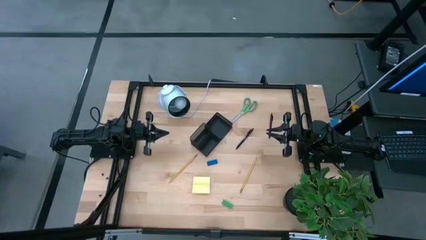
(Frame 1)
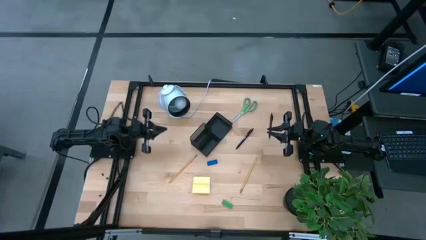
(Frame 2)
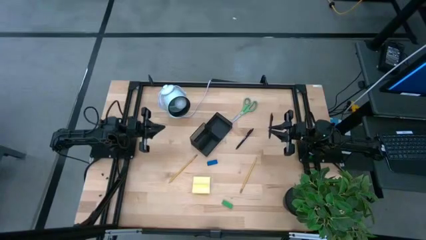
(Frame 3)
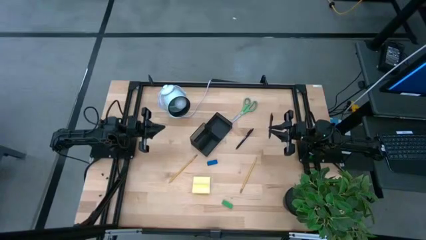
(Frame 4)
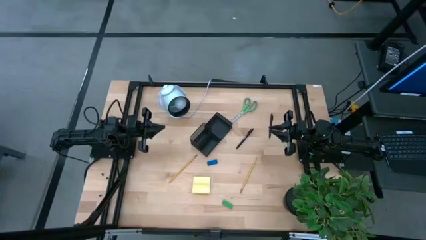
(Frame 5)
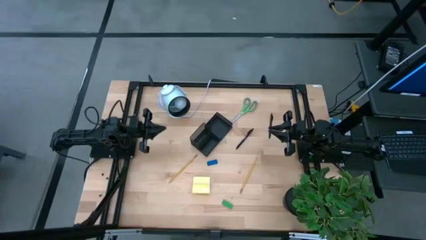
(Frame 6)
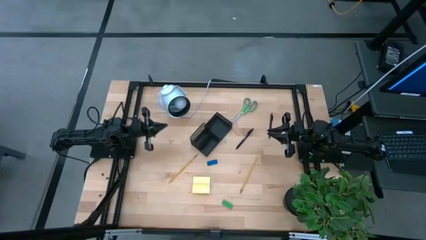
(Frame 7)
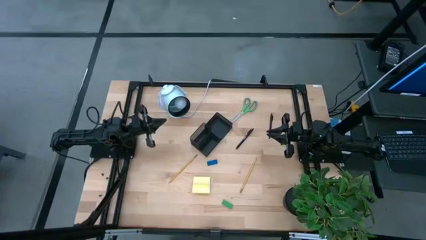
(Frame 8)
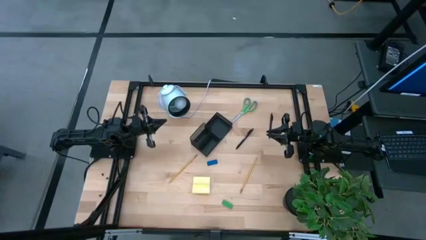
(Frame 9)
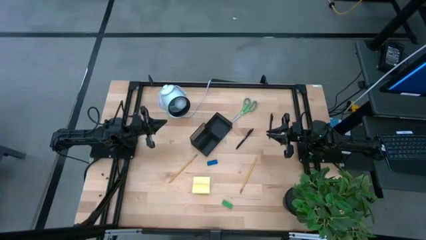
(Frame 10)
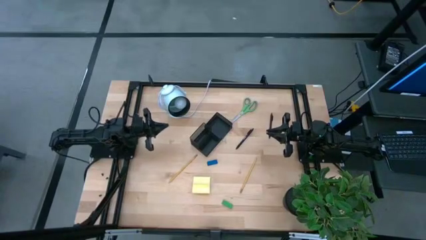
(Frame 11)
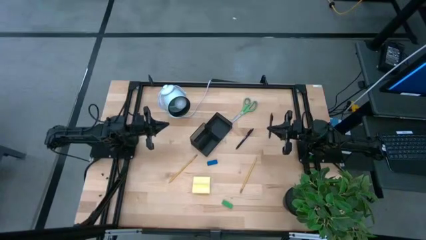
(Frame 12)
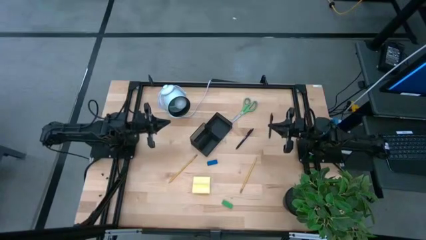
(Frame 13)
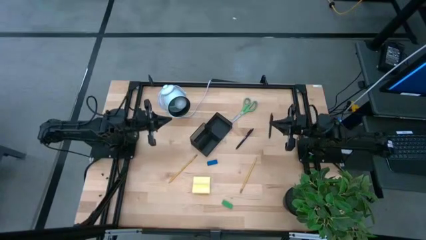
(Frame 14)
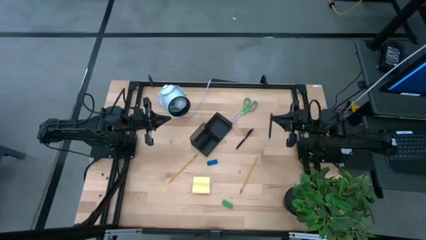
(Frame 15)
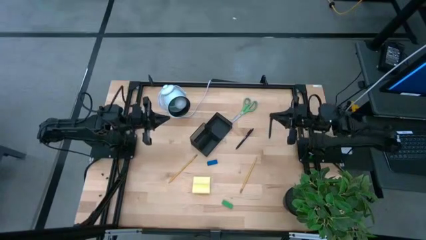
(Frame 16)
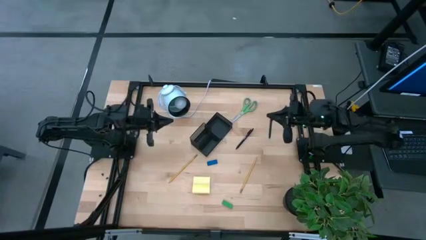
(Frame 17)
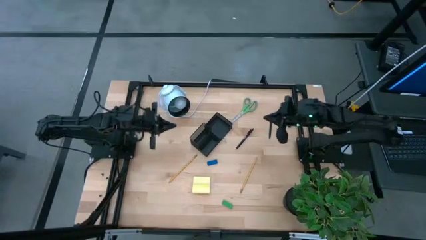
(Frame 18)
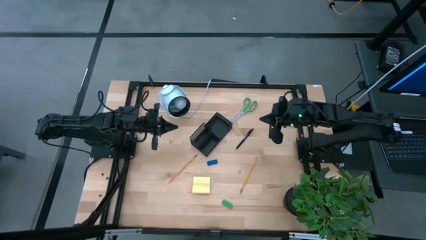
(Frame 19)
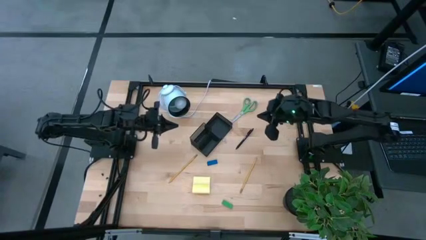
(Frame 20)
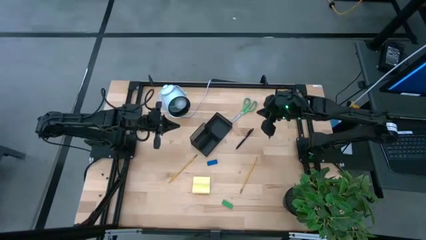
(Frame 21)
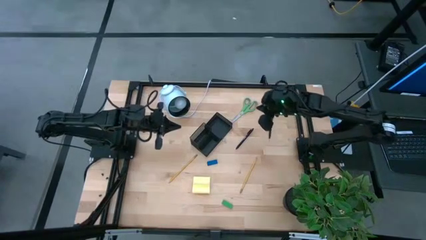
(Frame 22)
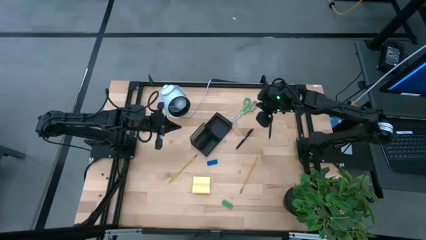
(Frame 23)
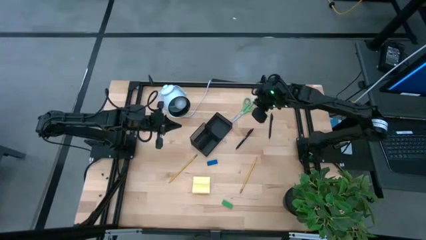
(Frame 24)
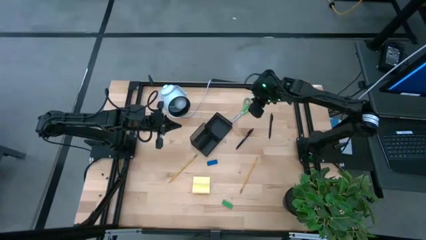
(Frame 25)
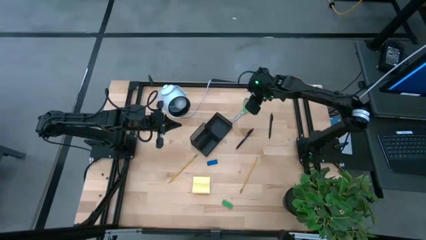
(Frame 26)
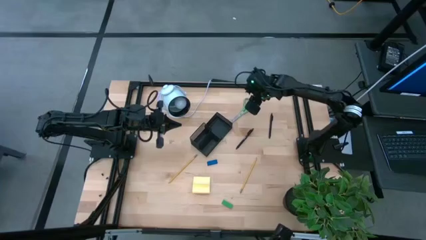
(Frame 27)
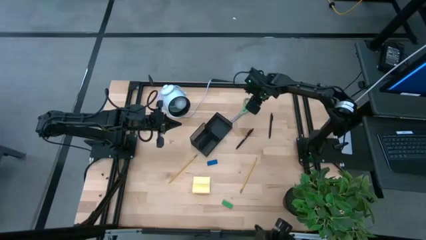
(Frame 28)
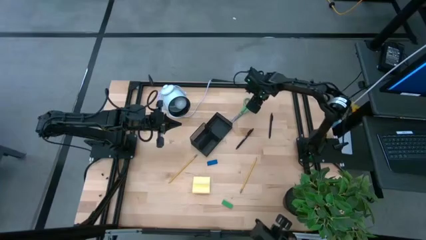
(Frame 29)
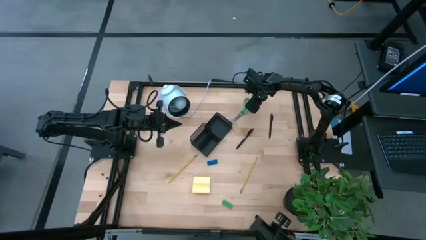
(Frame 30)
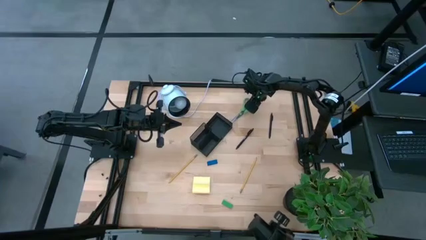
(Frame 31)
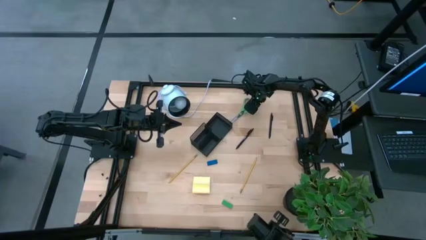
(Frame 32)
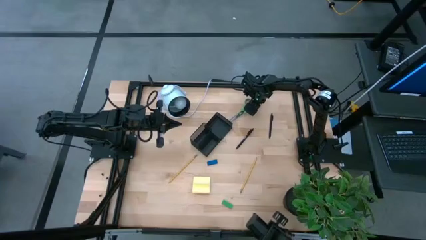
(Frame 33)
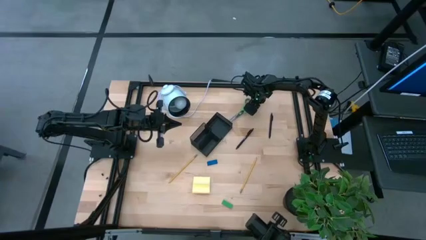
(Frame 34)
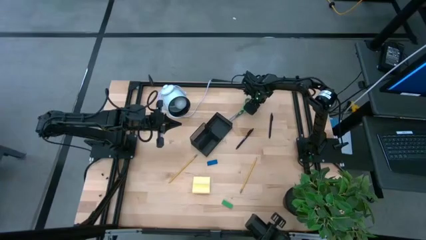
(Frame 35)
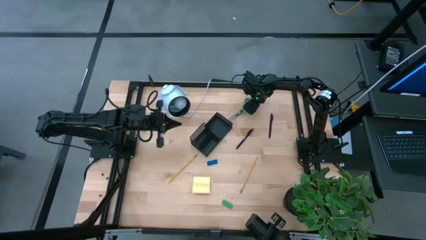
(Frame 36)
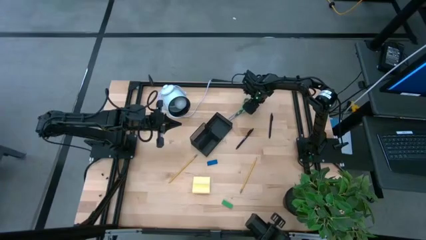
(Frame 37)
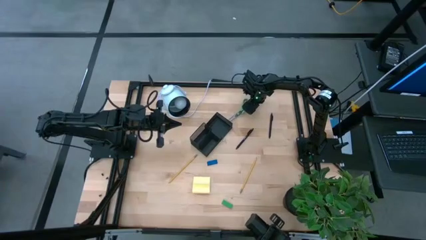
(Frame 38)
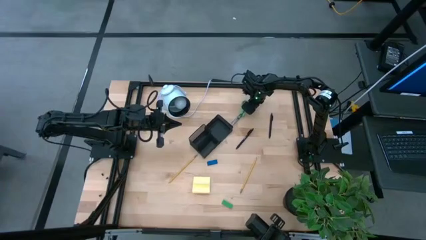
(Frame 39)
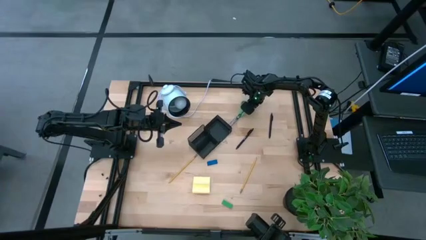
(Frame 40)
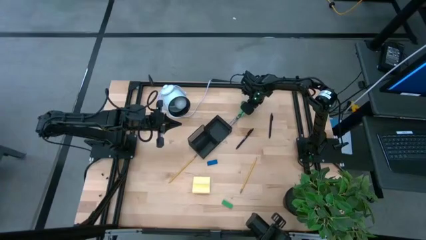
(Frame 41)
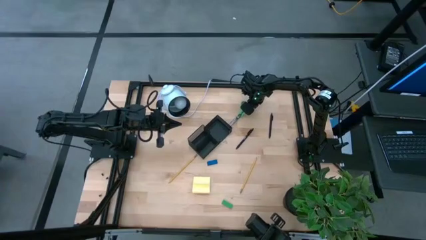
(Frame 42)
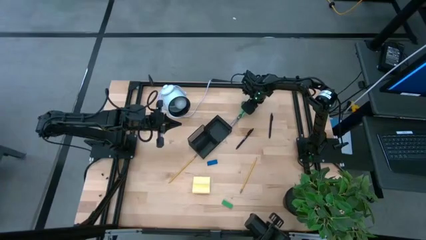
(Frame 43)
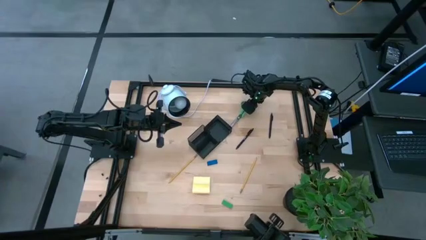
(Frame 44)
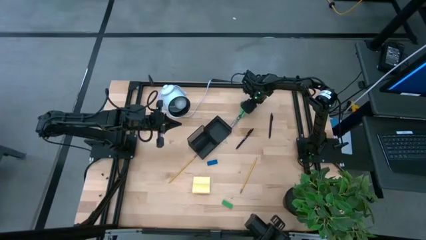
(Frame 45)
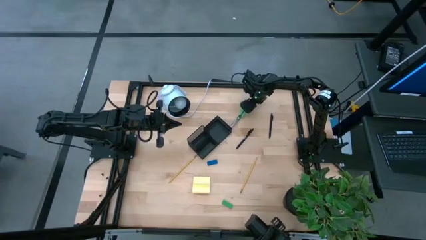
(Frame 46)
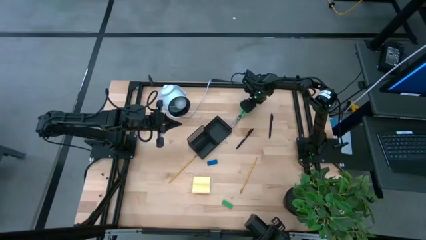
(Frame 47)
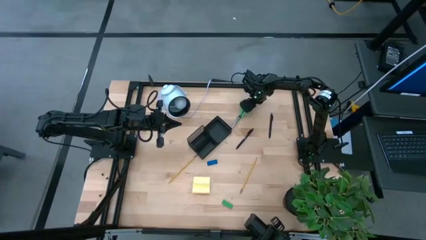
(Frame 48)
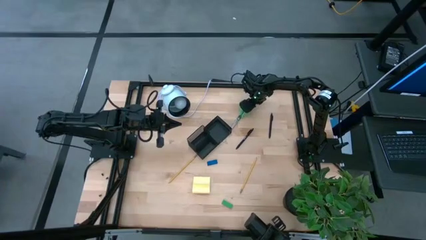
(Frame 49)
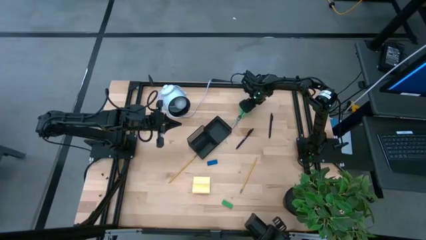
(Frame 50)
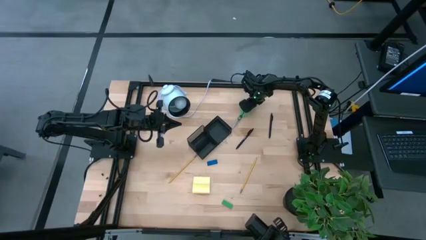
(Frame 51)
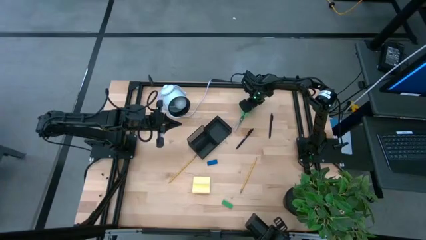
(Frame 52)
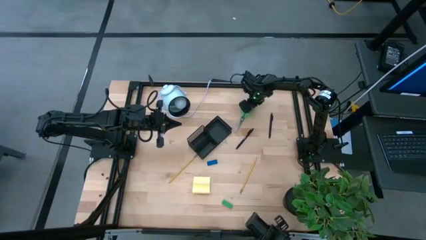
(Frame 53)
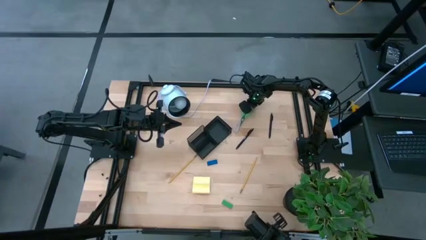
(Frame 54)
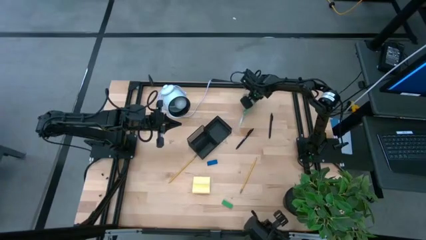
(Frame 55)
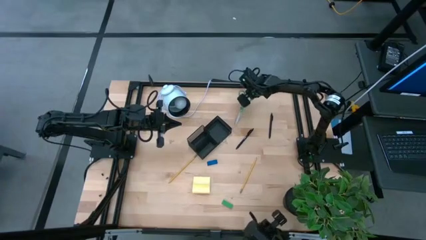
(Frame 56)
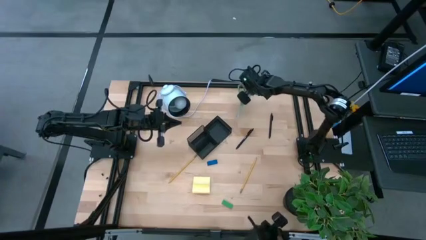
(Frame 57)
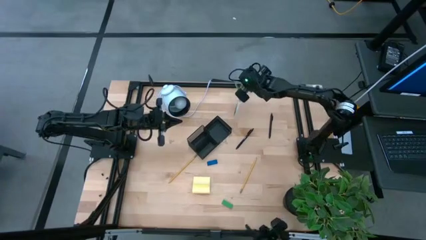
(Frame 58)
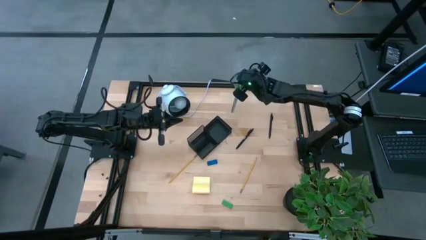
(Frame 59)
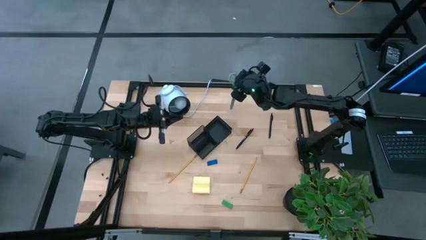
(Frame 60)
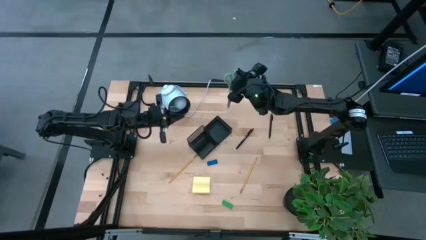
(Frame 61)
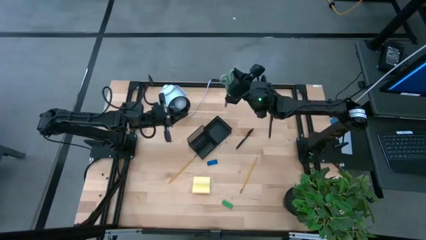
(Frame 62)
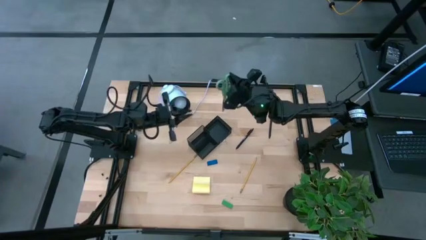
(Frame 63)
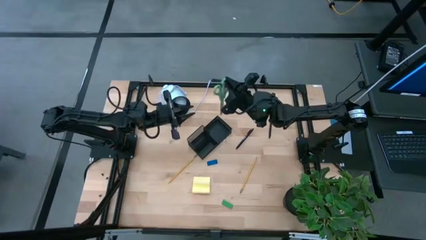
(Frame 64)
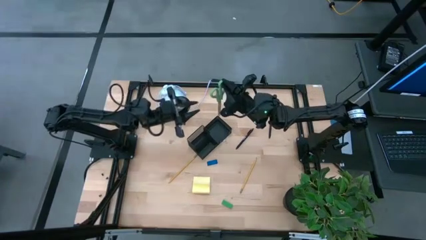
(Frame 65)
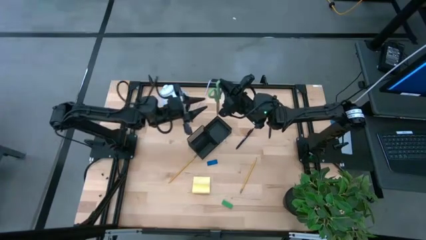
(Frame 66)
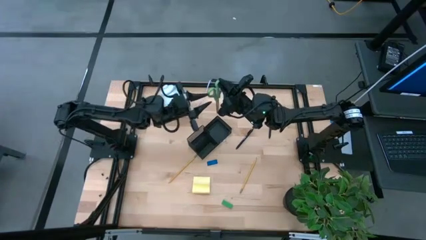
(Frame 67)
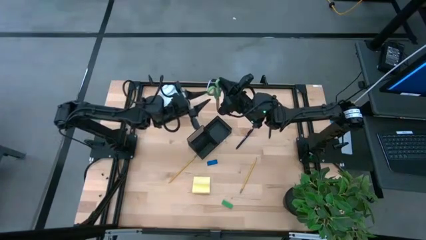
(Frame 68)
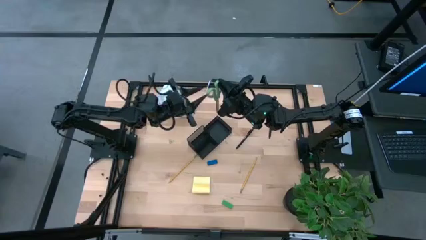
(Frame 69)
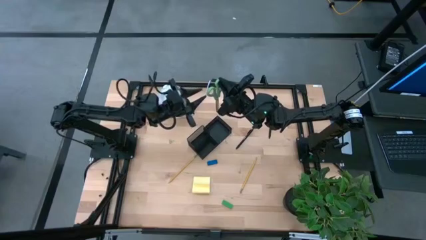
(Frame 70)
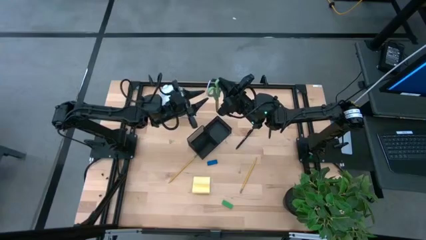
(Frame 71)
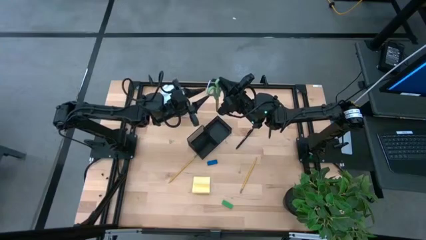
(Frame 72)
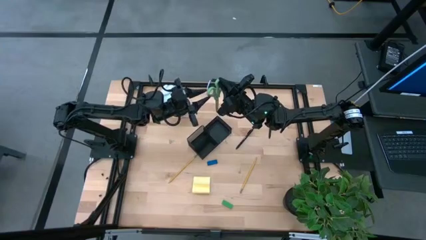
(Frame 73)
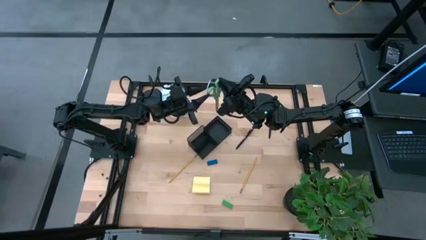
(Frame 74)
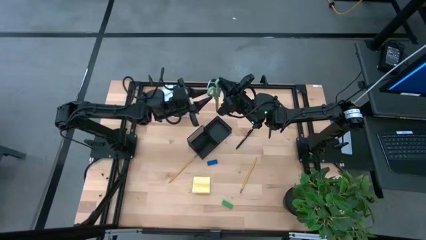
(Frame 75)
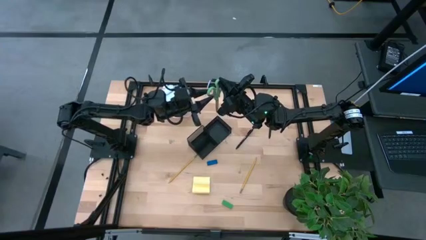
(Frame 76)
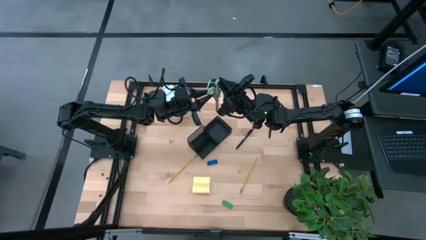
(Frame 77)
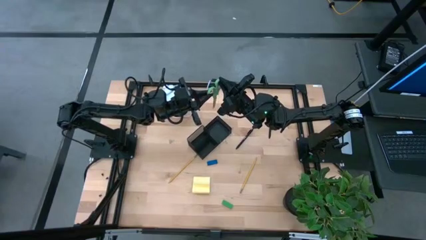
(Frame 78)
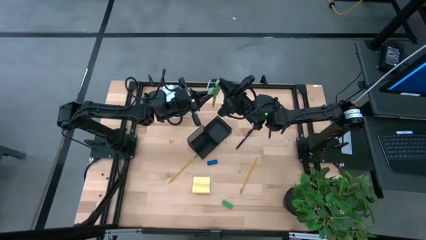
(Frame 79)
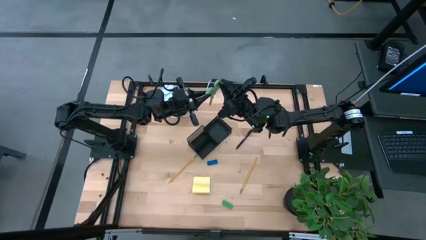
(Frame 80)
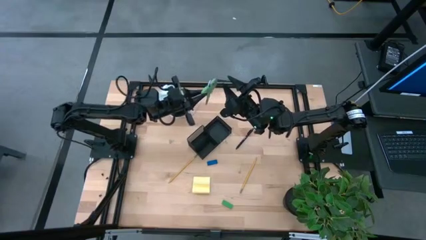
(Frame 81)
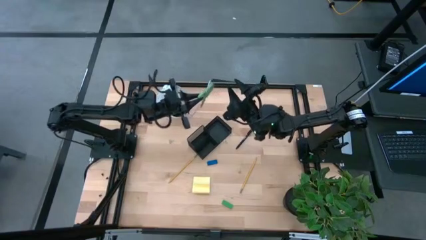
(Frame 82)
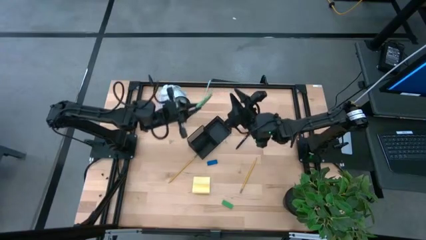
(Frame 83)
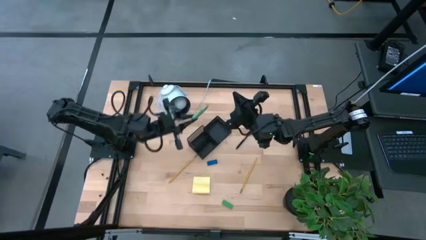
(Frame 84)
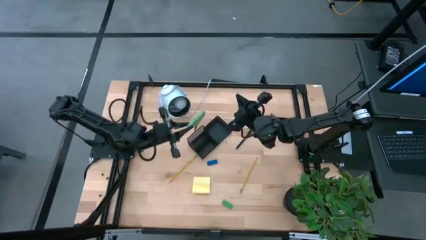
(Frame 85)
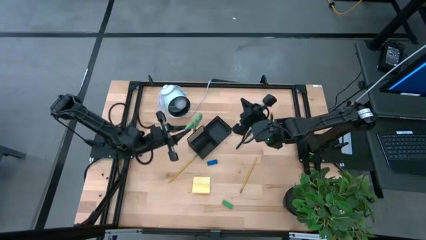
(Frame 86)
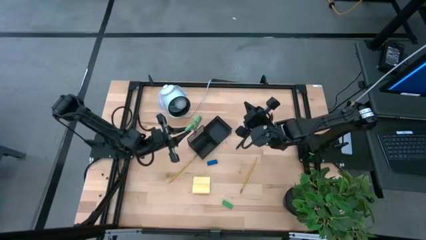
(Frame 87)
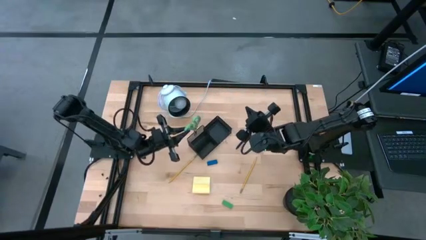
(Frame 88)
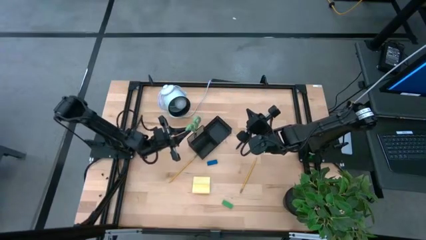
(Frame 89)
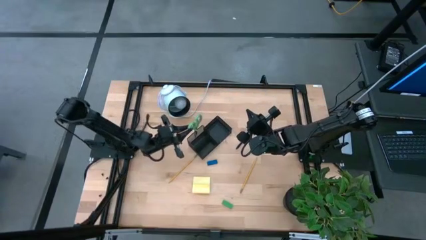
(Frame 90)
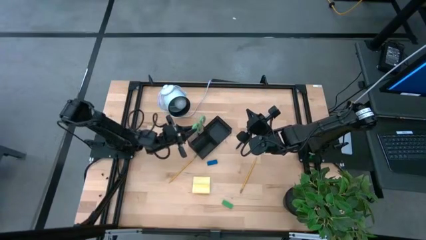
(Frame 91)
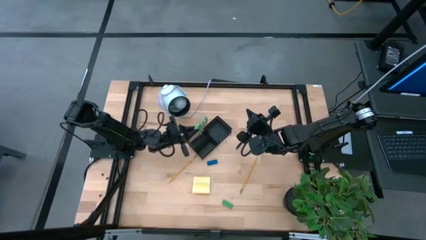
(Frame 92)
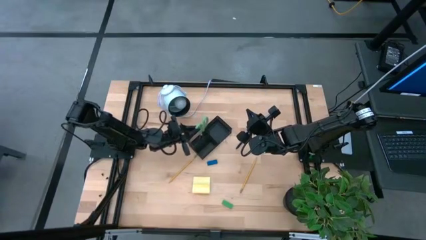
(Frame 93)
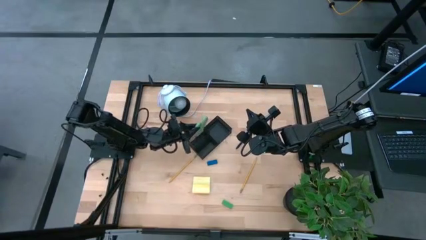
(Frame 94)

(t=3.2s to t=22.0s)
Task: Pick and place office supplies into organizer
Put the green scissors into the black desk organizer
